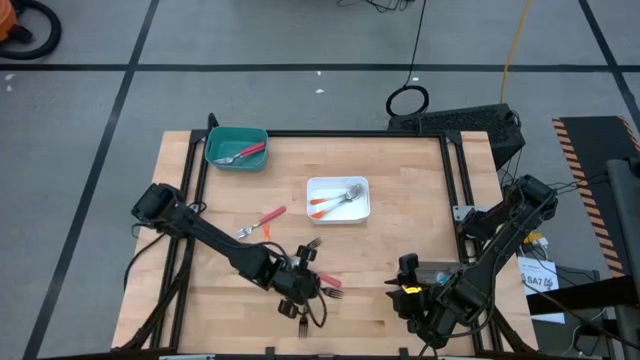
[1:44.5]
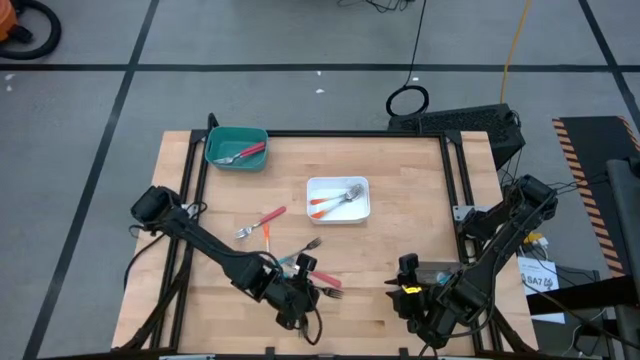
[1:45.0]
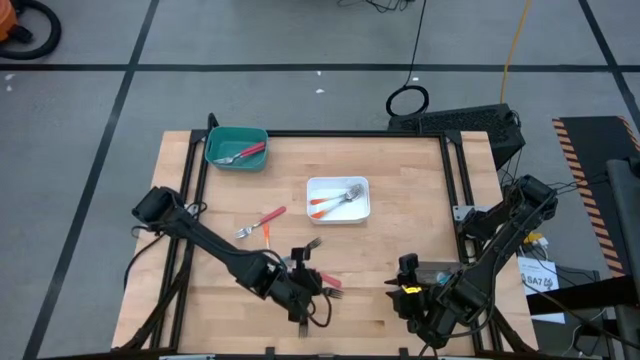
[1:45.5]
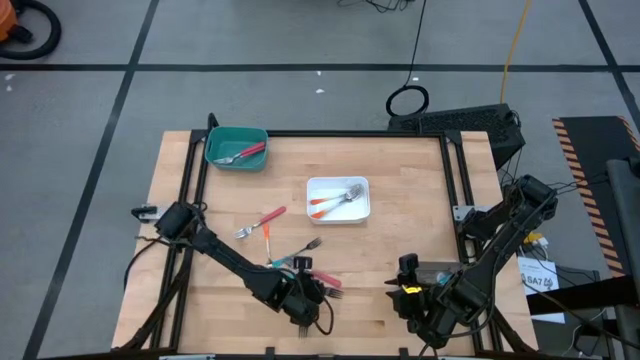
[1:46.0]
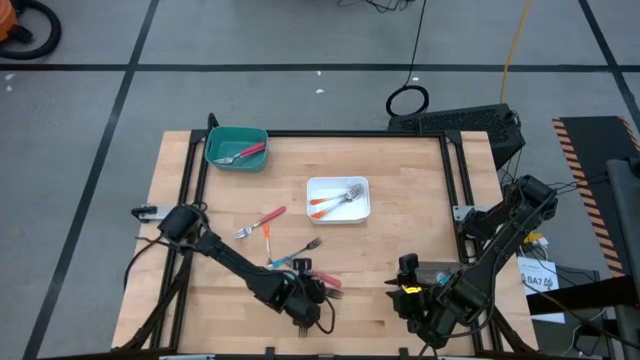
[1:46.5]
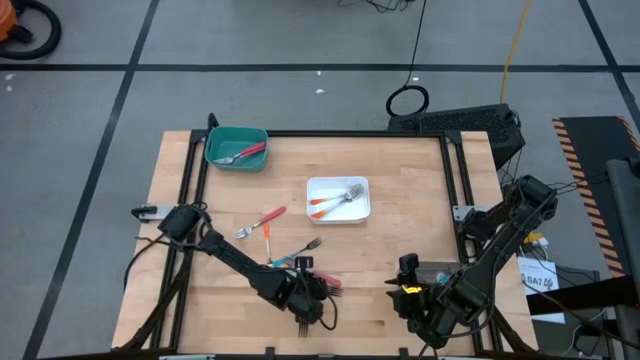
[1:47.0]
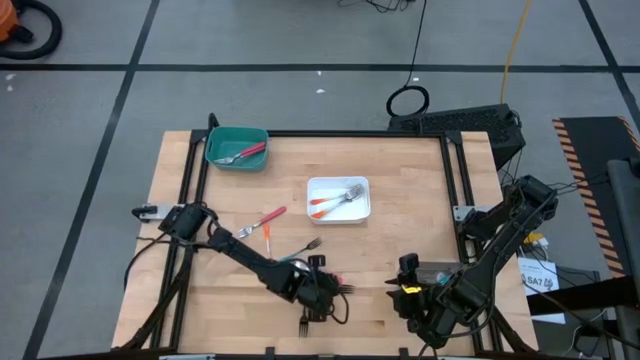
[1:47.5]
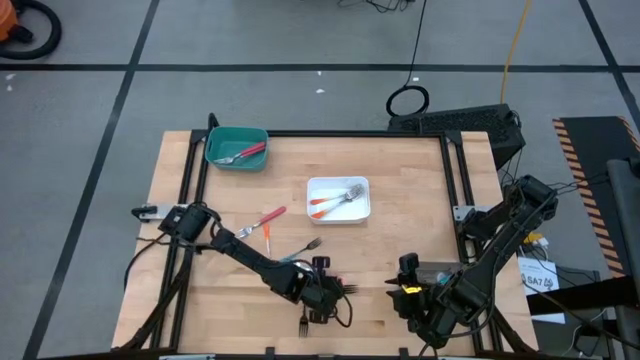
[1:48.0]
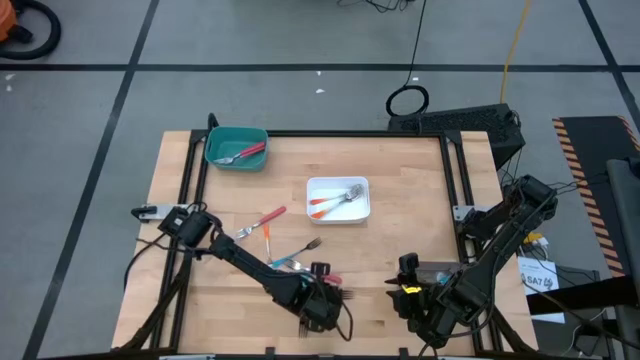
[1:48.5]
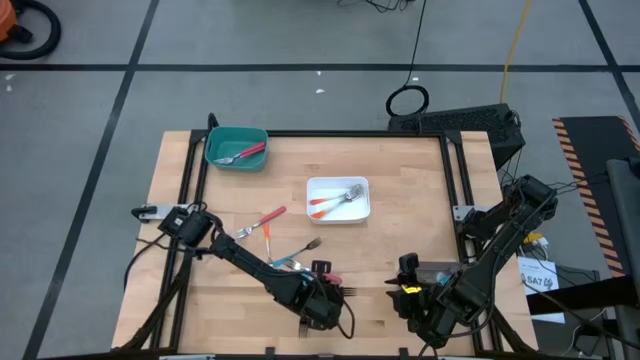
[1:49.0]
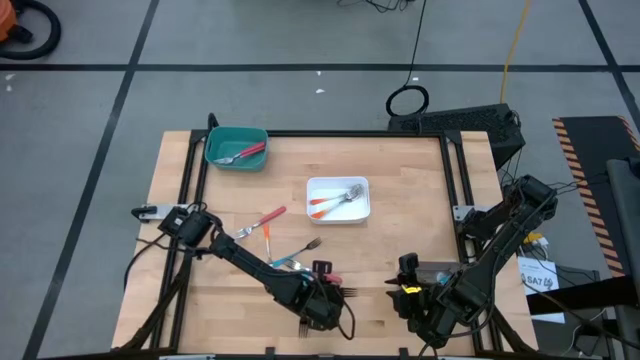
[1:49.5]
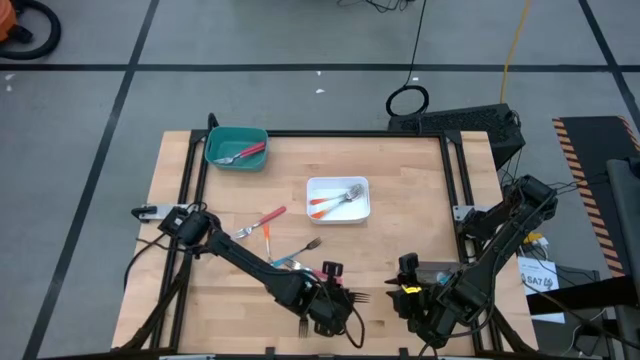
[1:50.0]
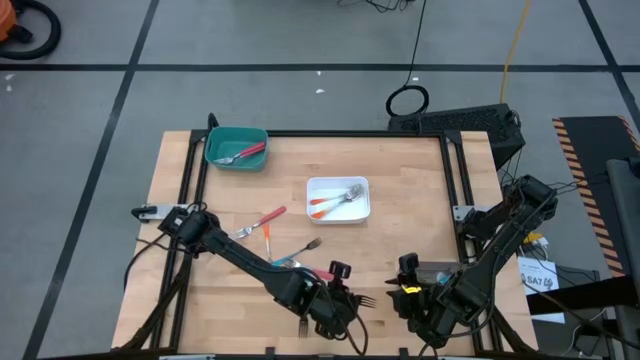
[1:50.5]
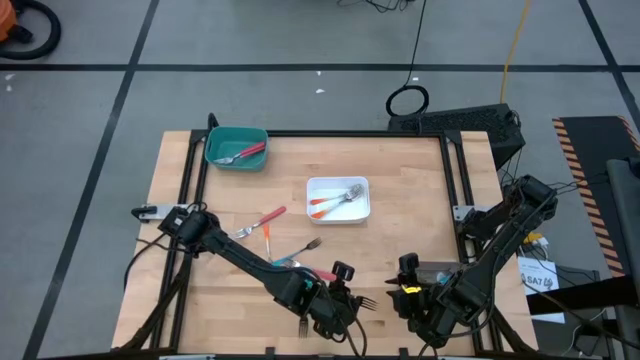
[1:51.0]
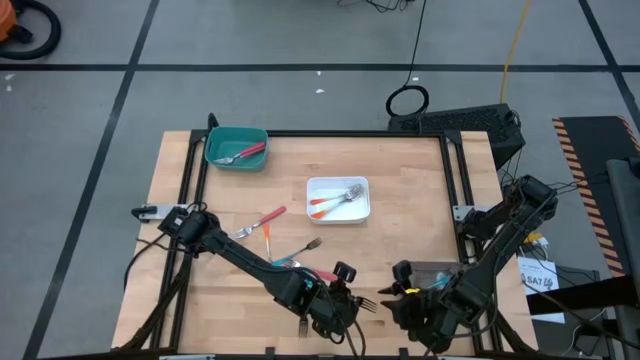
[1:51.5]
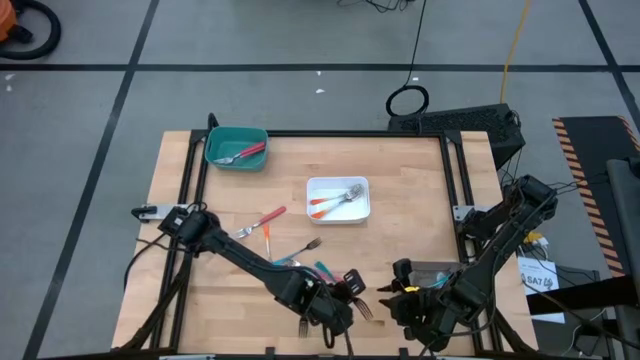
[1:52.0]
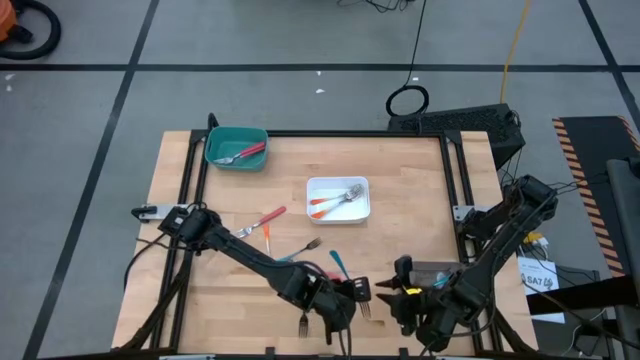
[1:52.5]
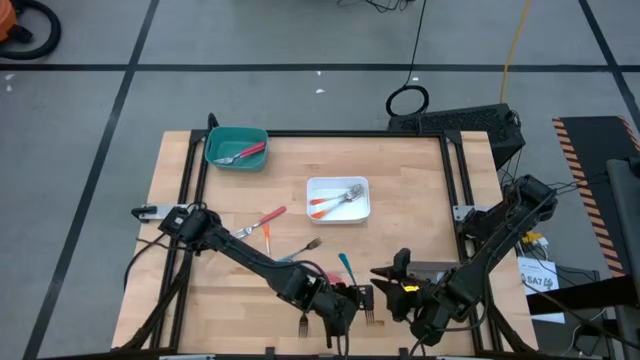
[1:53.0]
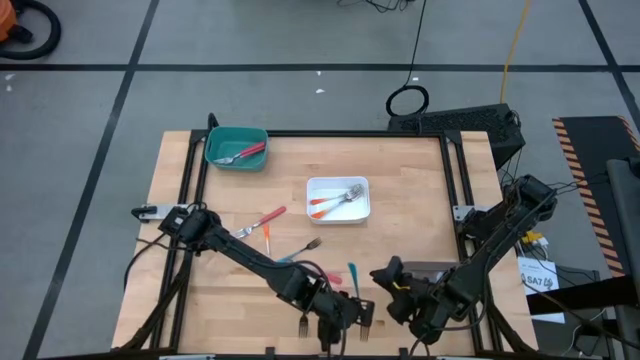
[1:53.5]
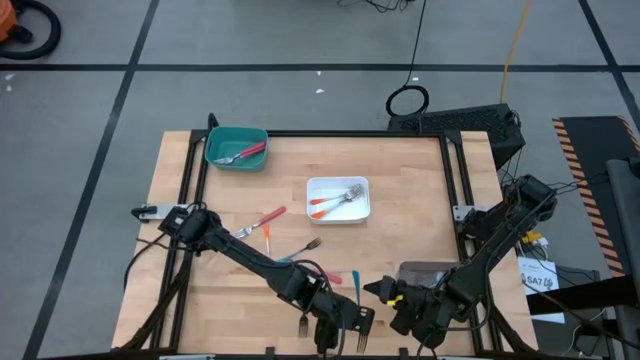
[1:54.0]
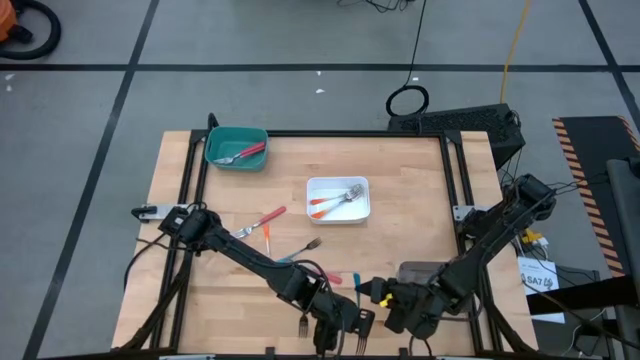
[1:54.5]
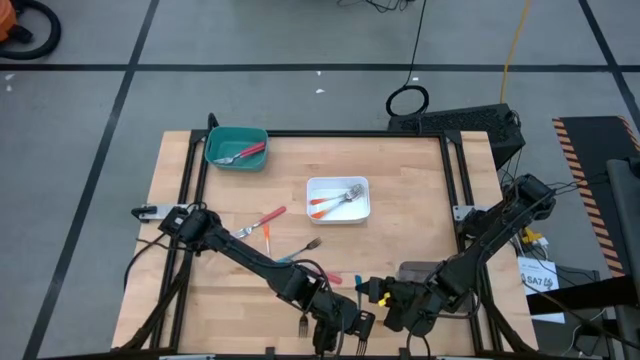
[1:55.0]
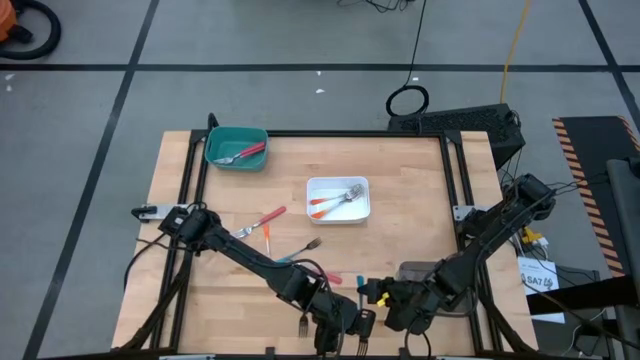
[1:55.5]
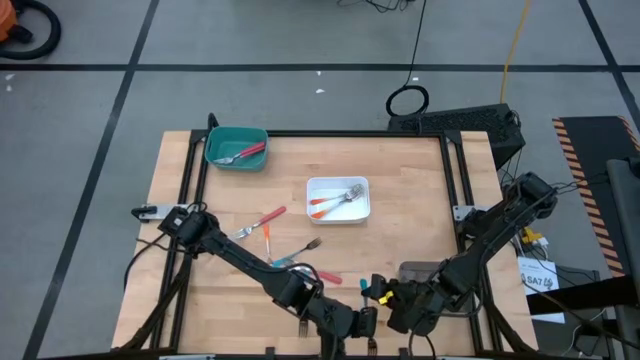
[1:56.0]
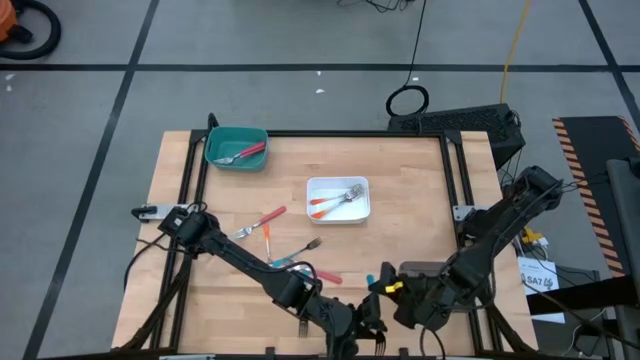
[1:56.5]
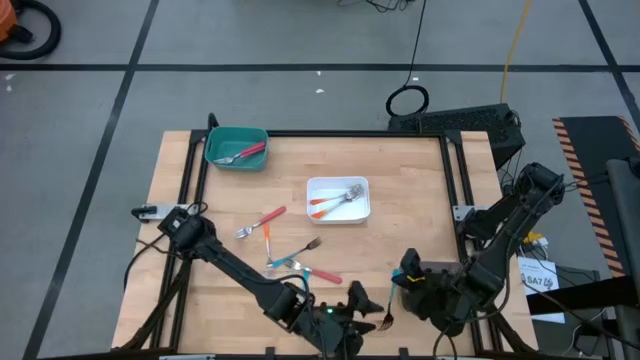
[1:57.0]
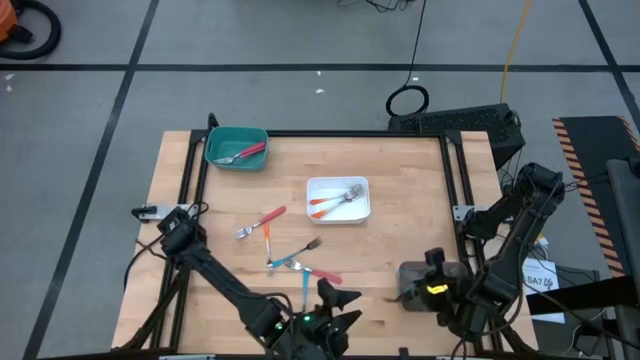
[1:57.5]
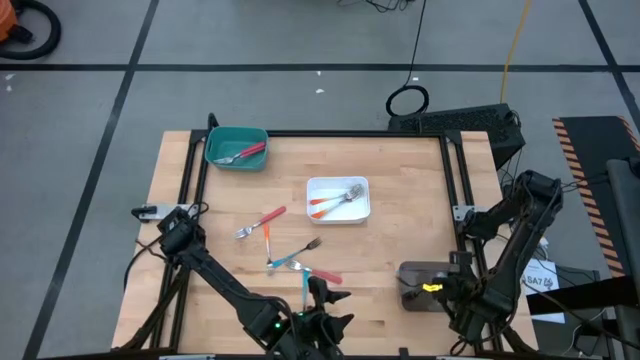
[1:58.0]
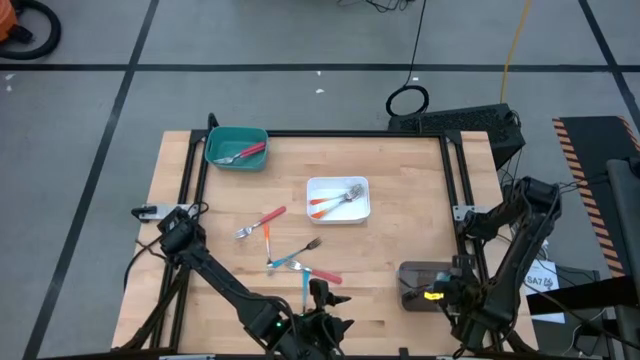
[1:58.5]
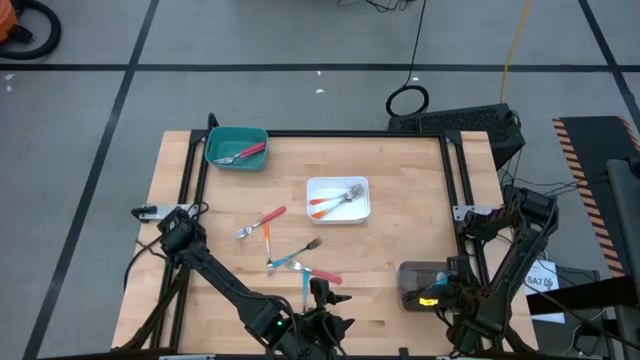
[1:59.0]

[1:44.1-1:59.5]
Task: Sort silverware by color (type)
Put the blue fork into the black bin

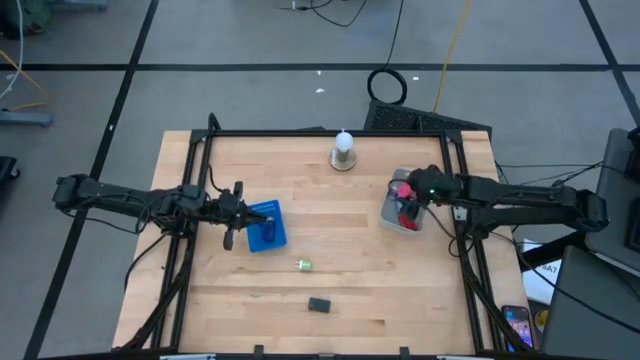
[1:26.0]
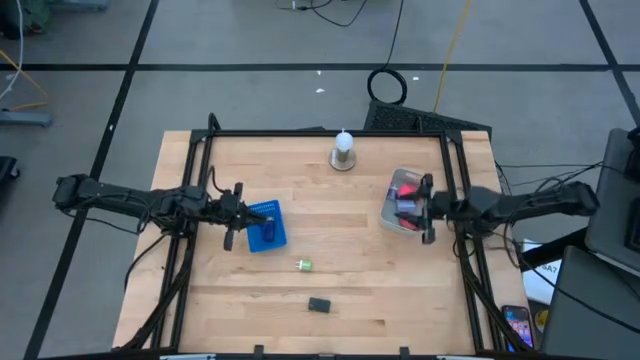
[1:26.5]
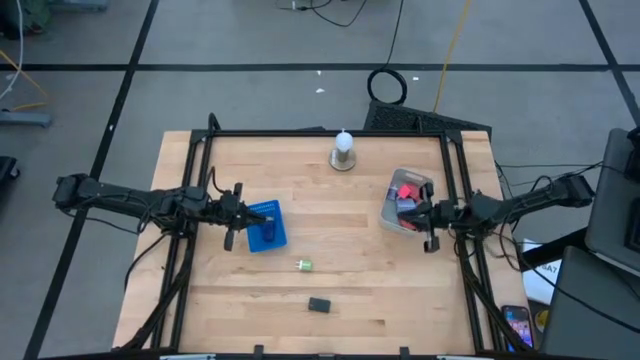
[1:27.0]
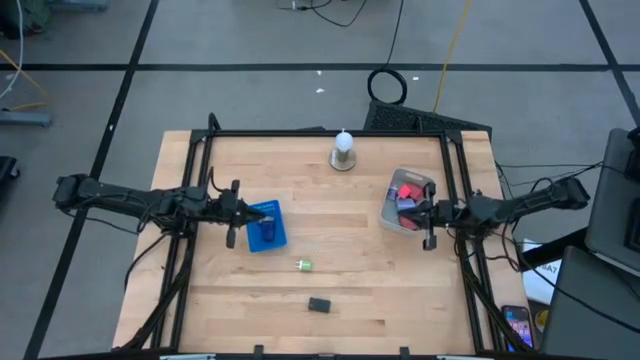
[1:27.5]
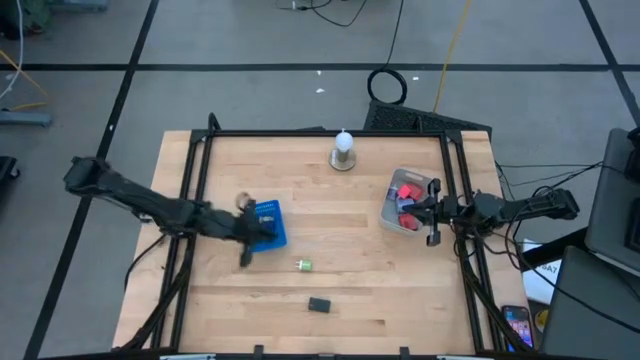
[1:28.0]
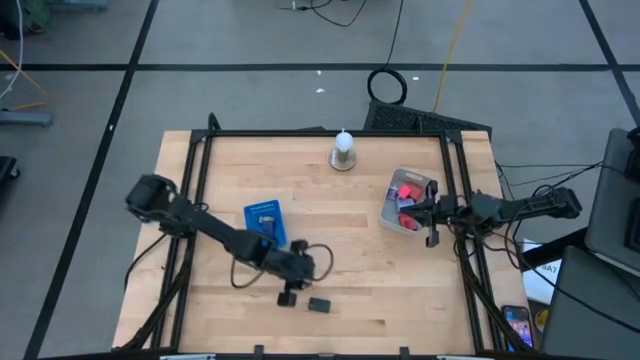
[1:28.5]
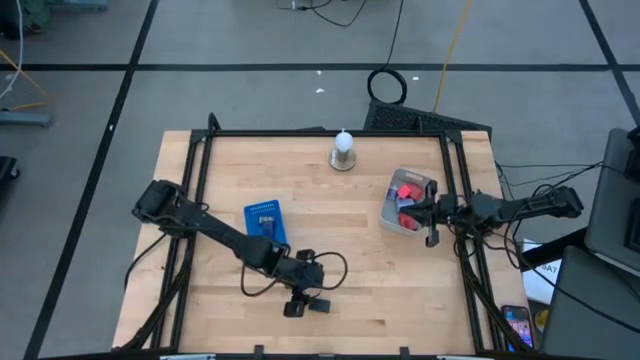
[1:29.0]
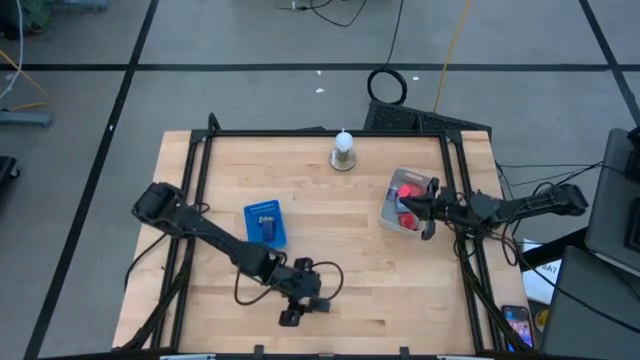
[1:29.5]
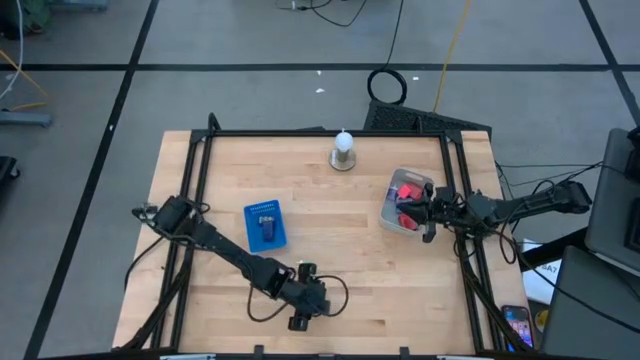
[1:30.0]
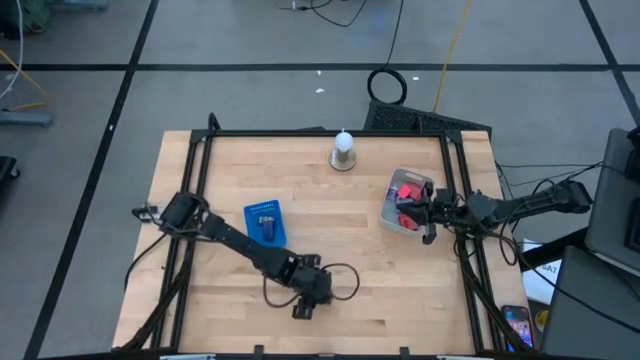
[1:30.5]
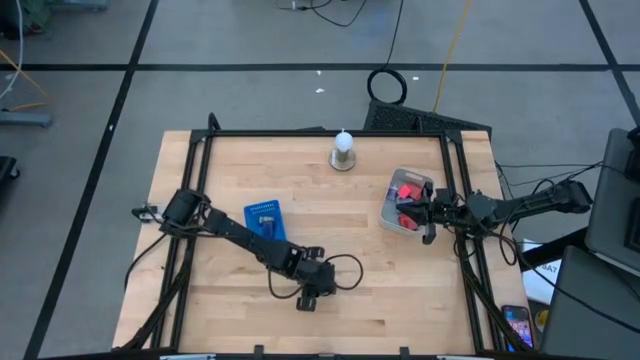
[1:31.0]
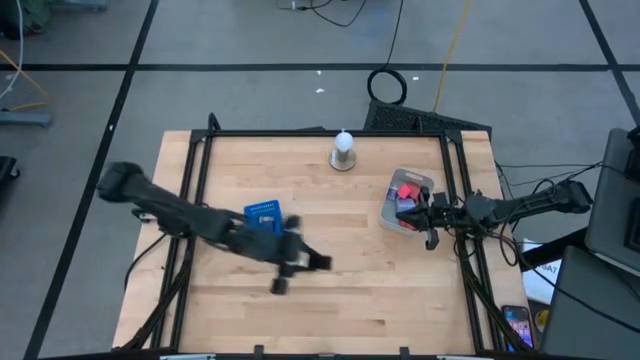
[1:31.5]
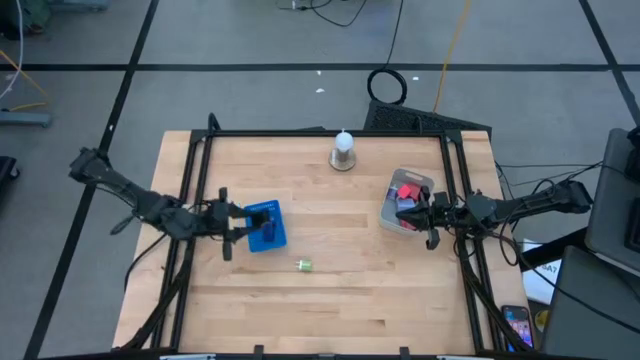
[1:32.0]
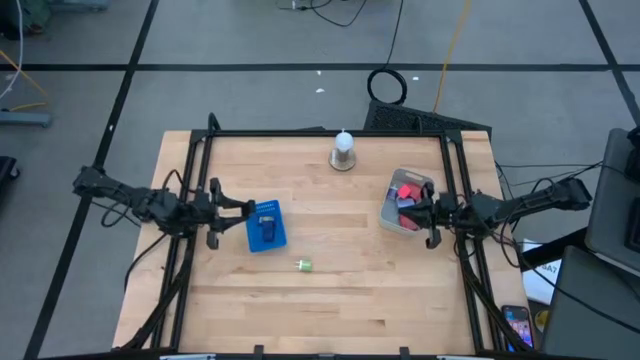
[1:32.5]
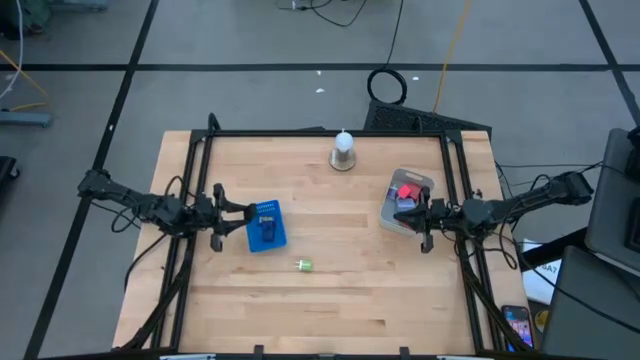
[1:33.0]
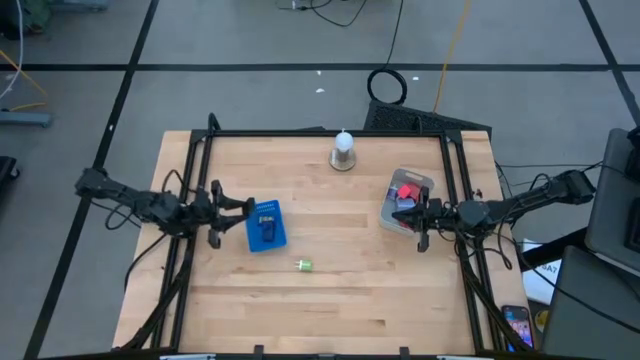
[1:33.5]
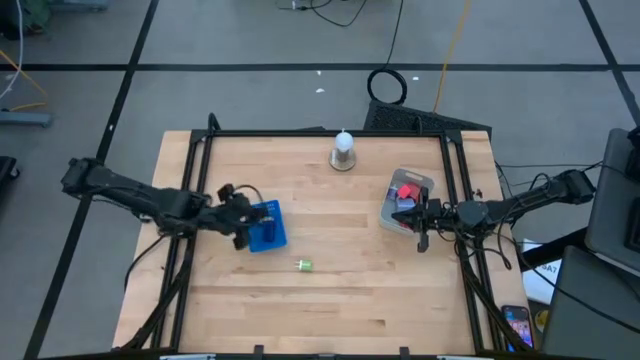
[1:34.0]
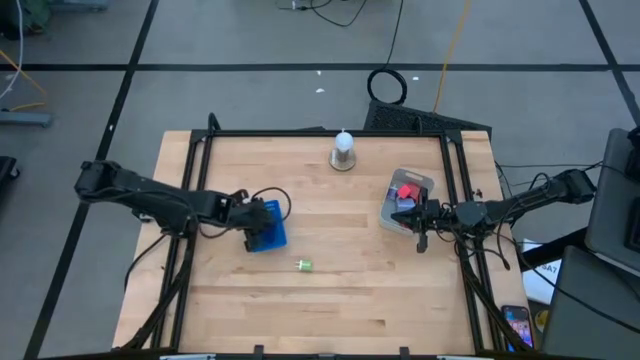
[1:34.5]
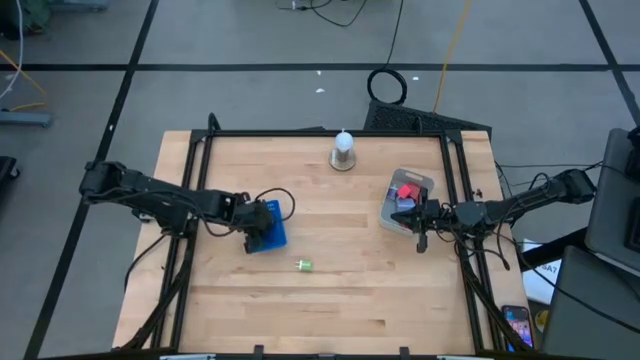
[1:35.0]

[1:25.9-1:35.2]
Task: Pick & Place Office items
Put the black digital timer into the blue bin
